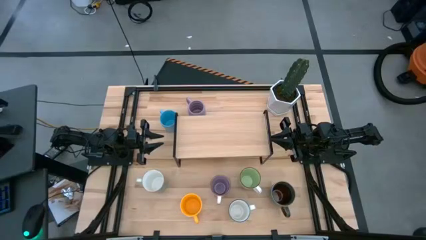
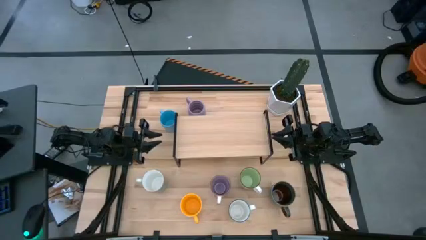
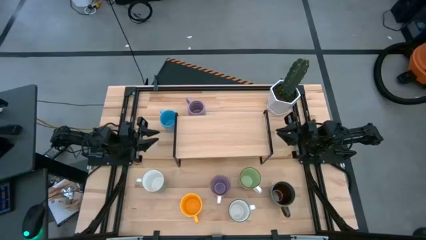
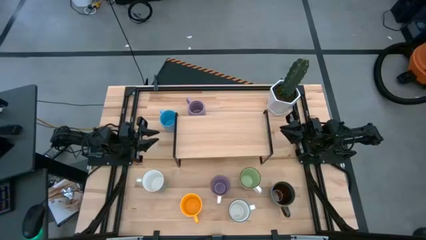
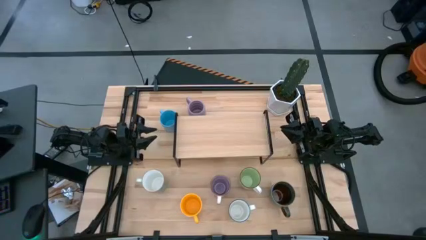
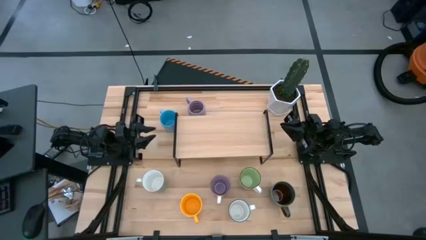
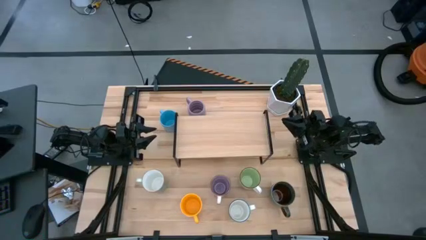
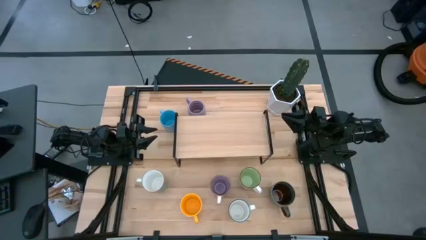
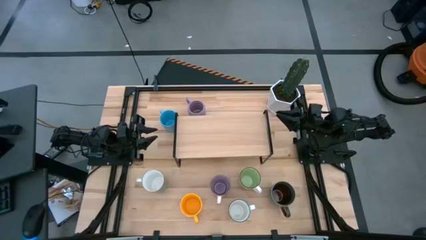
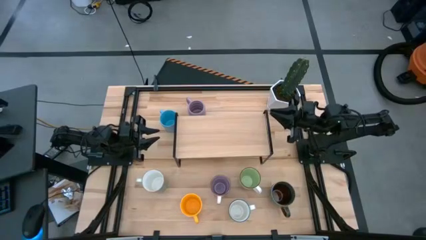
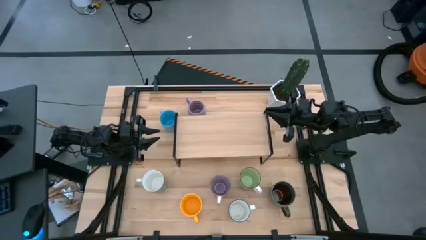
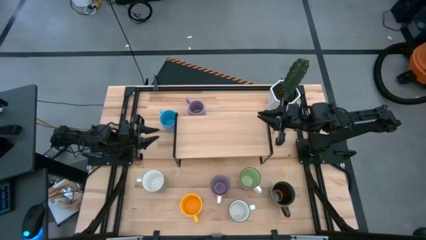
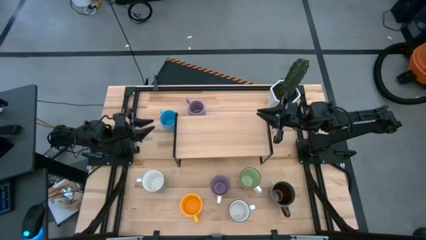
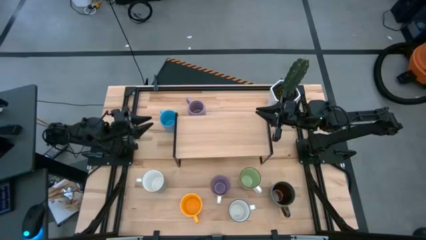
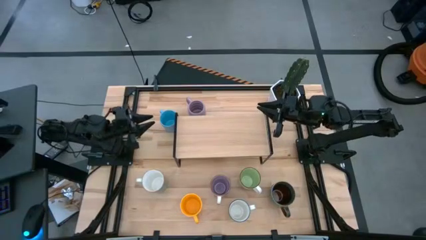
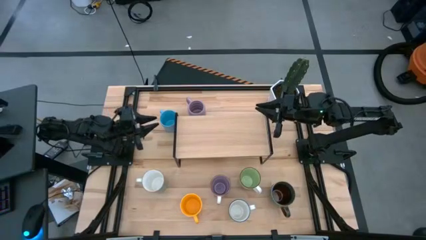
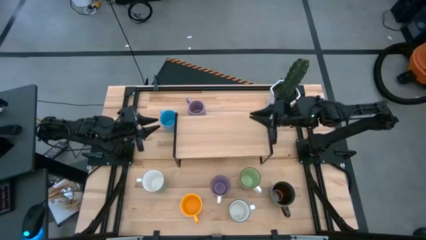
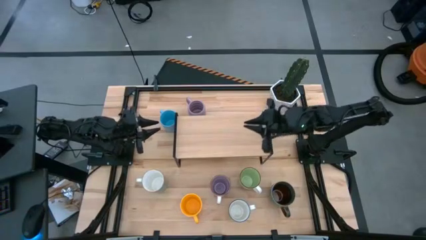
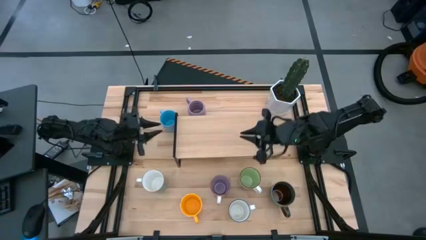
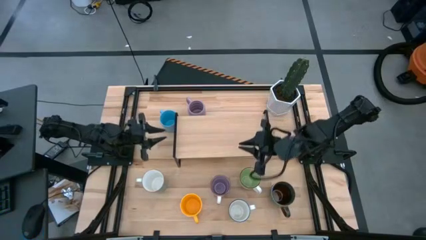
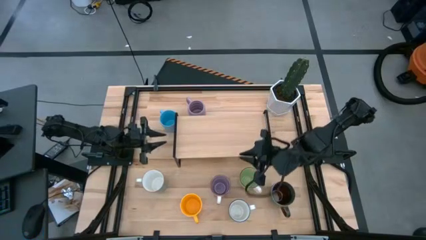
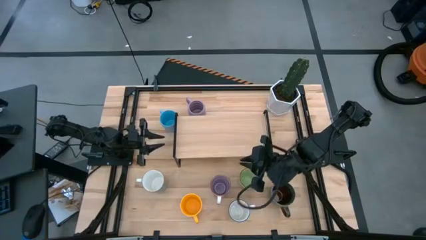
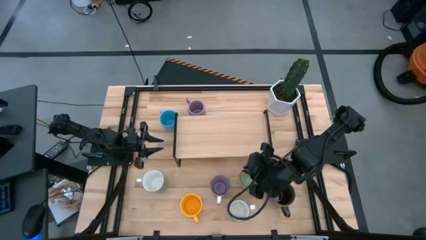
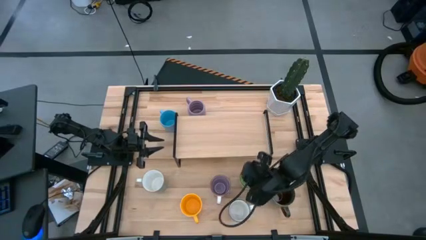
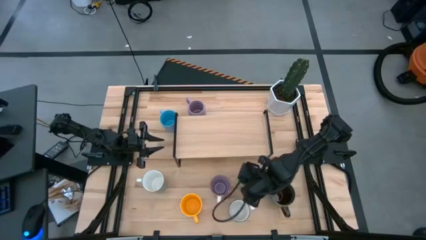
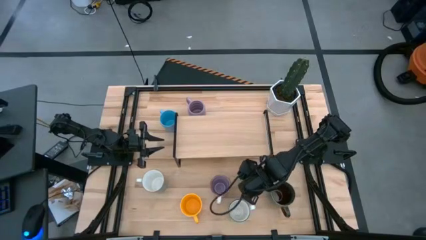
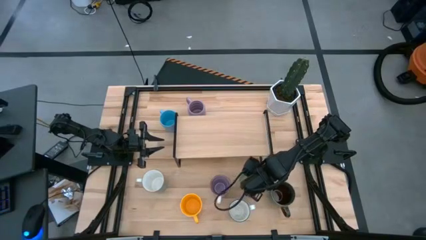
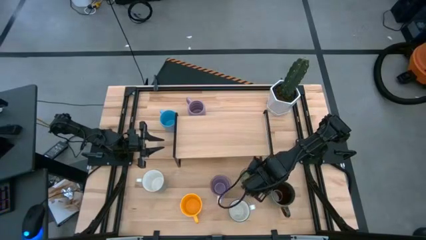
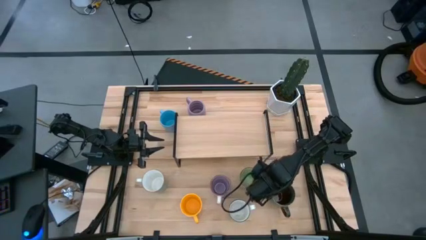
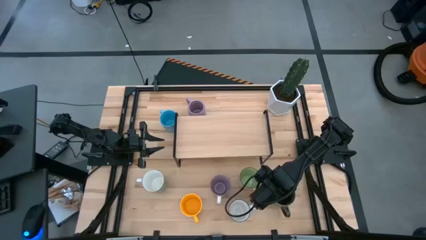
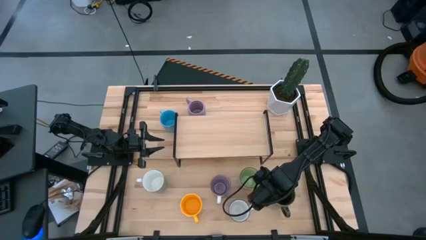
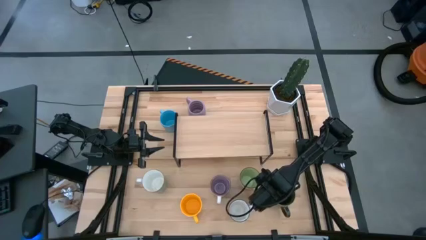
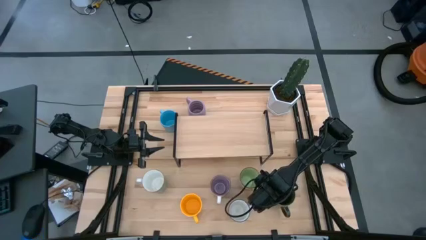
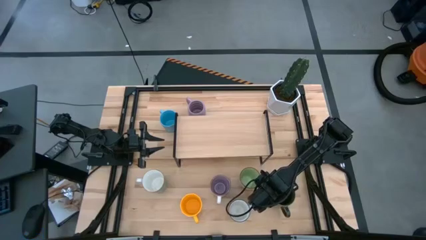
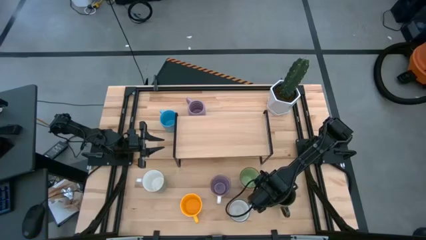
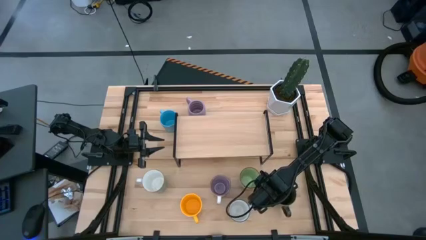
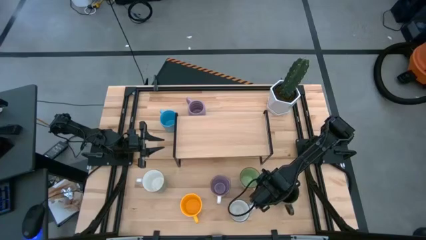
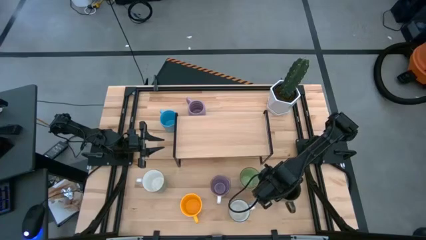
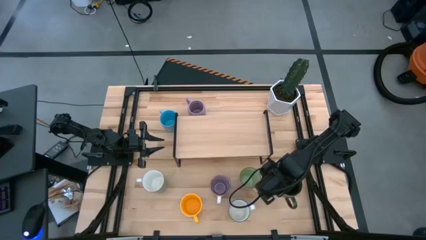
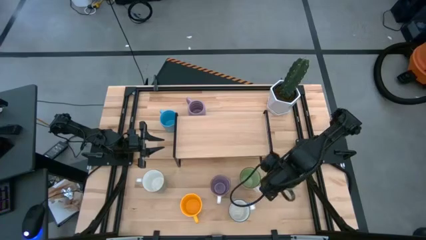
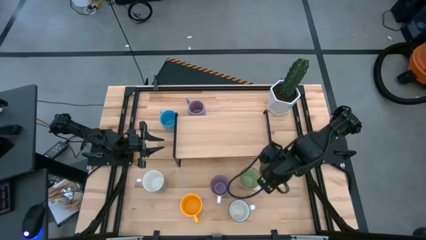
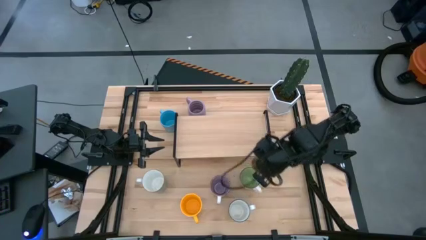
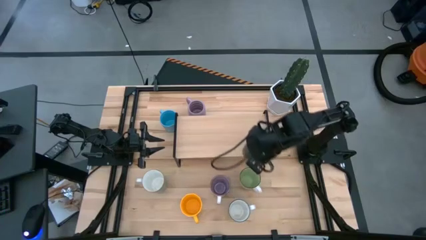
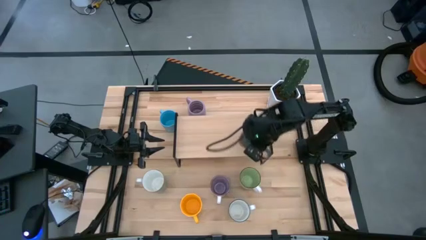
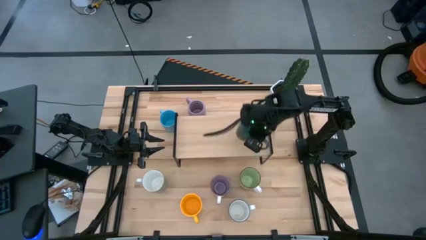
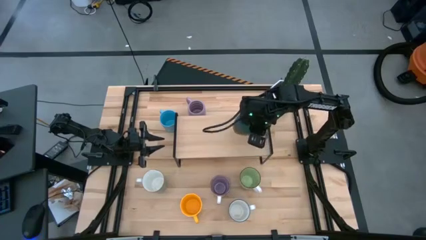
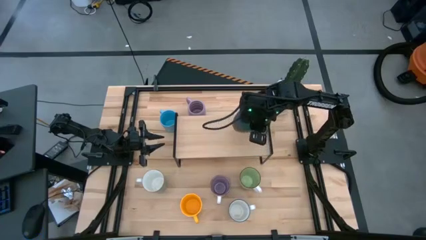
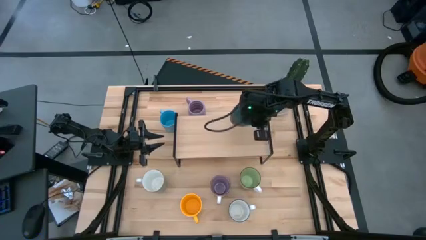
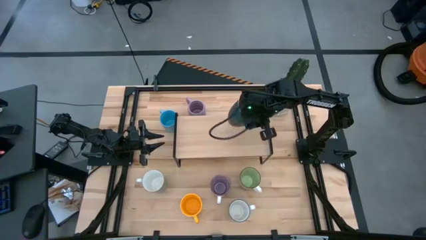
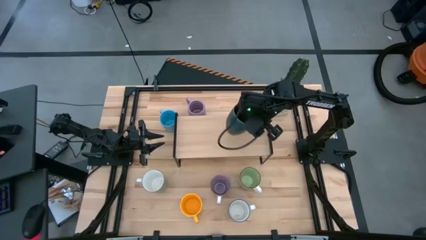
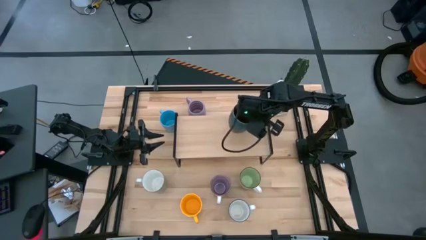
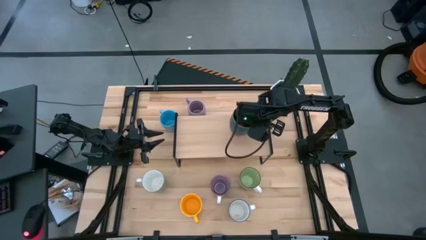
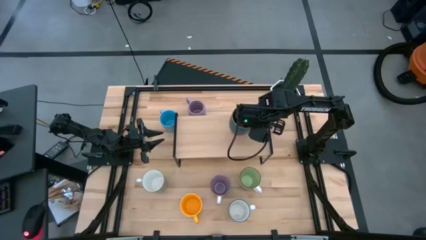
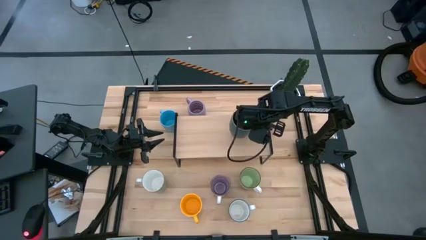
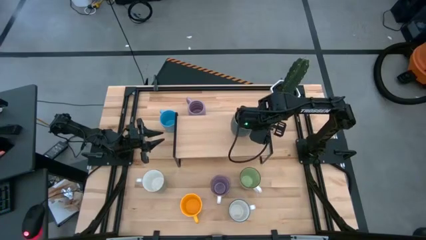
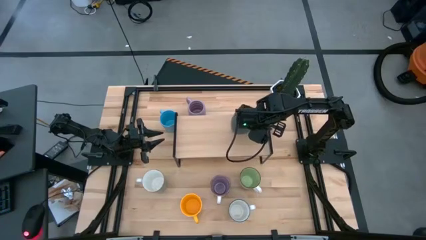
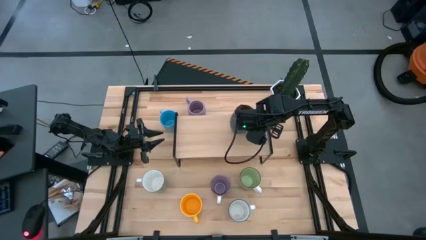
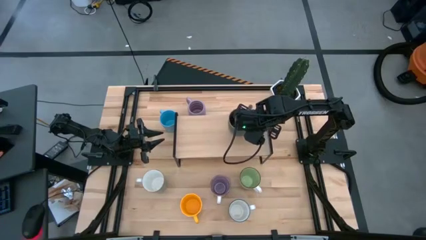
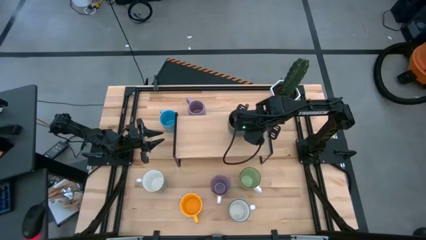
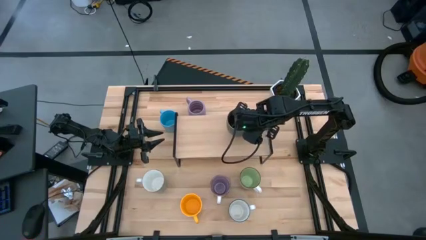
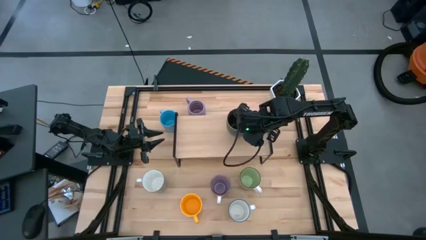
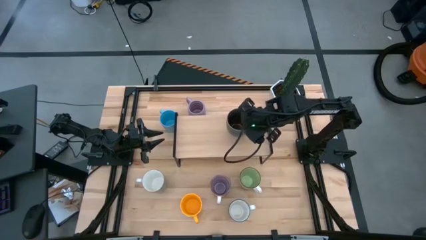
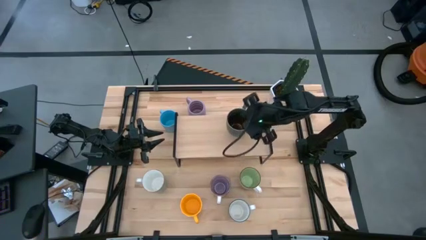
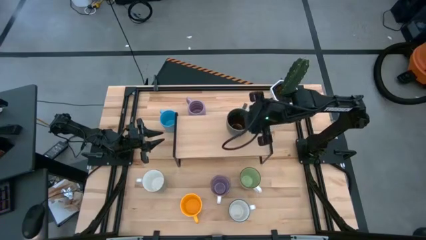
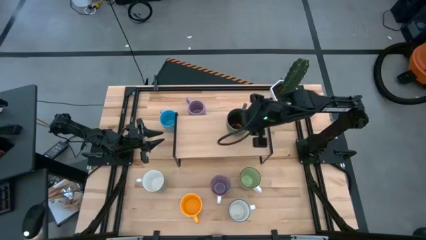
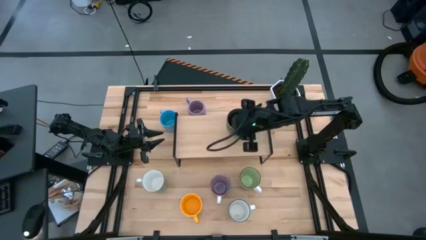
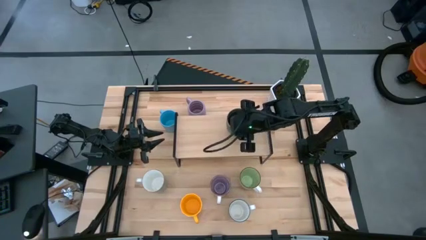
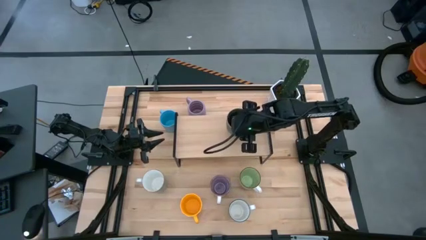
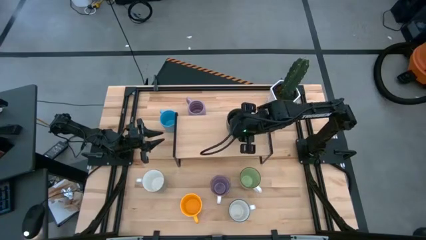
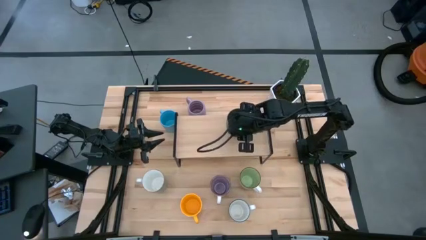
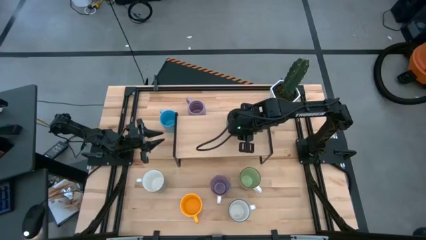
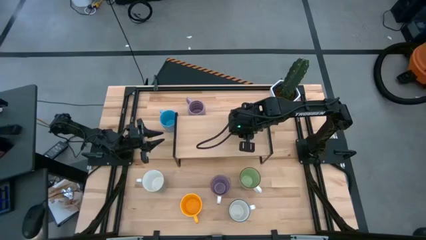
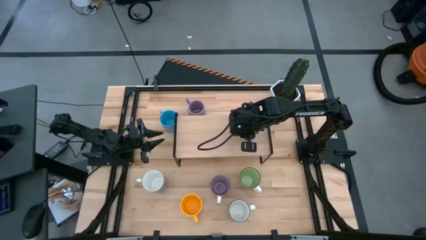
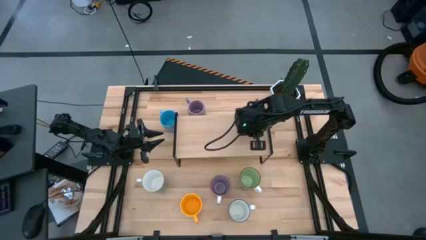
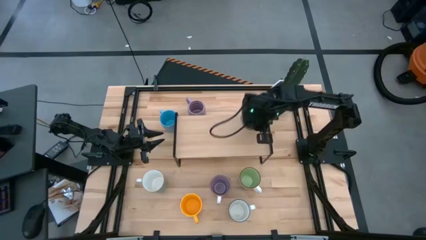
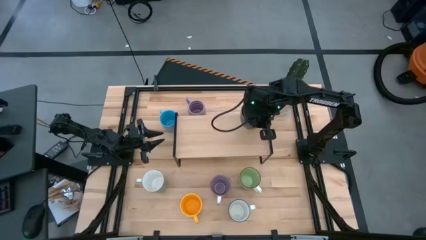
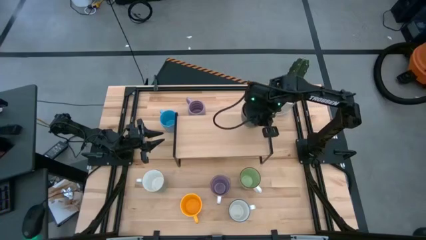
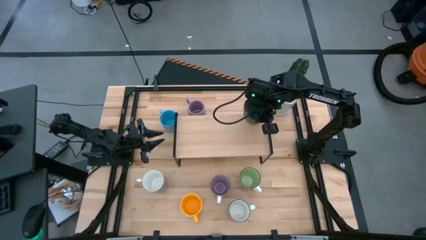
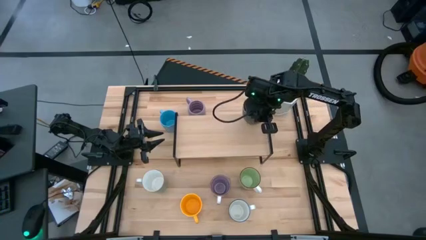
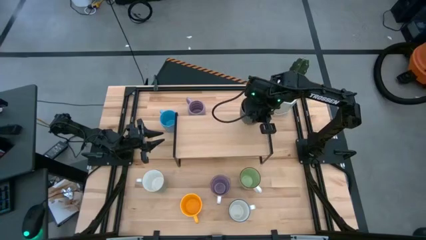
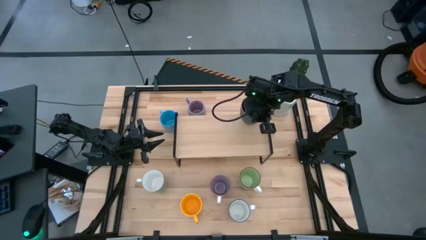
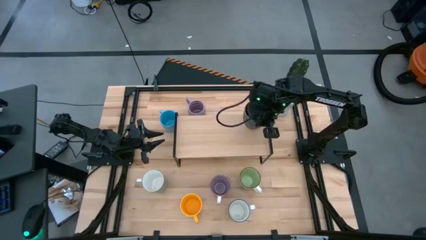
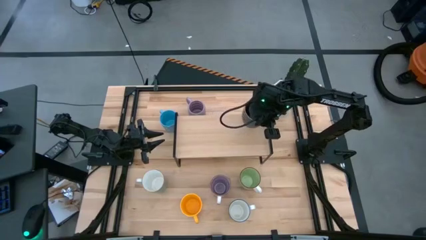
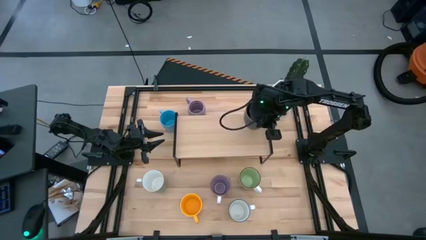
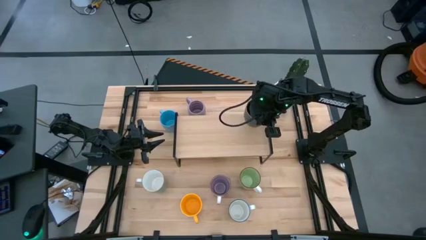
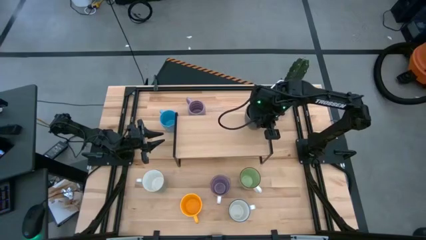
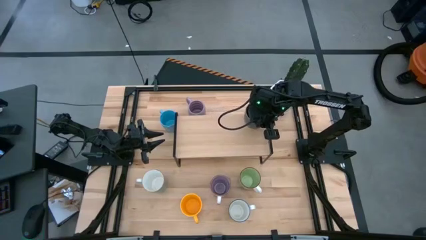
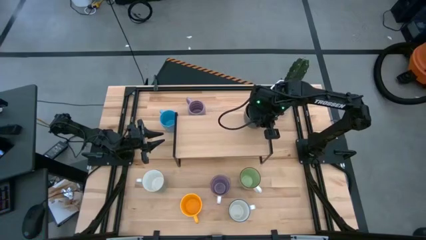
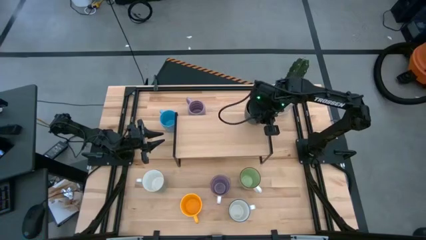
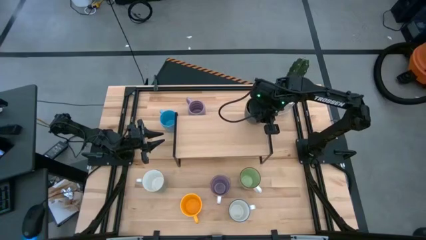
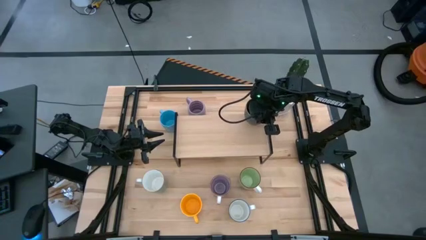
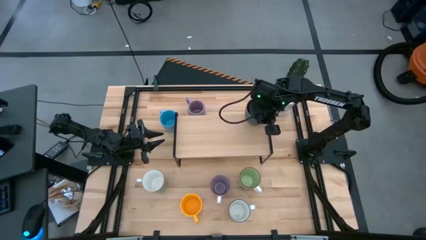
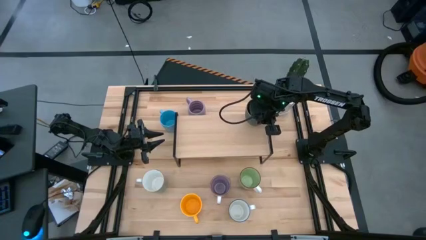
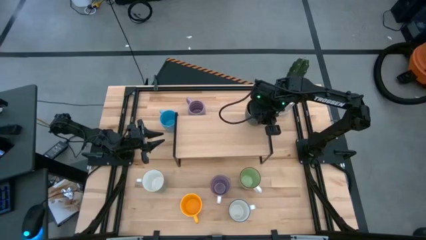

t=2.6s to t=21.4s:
Task: Place coffee mugs
Put the blue patterned mug on the shelf
